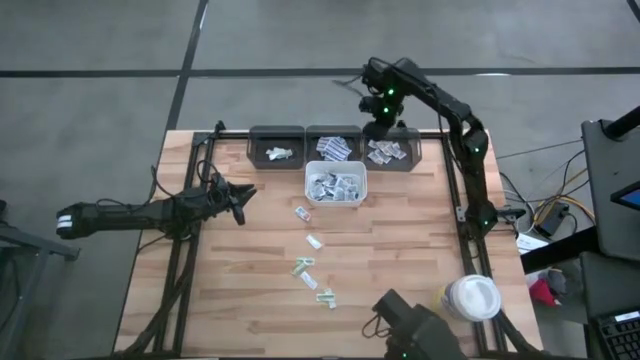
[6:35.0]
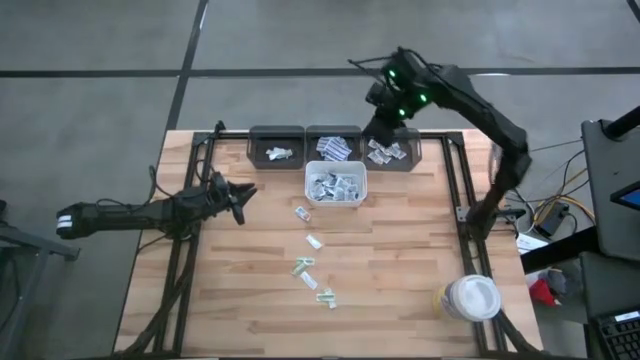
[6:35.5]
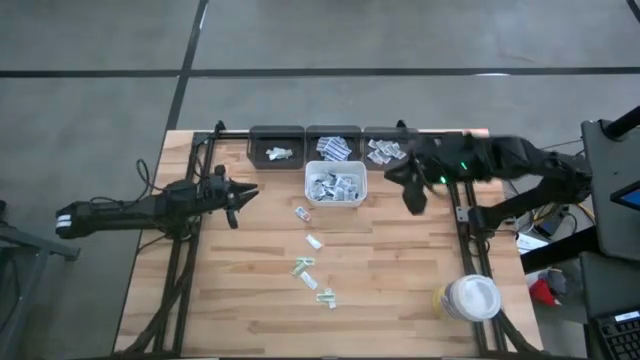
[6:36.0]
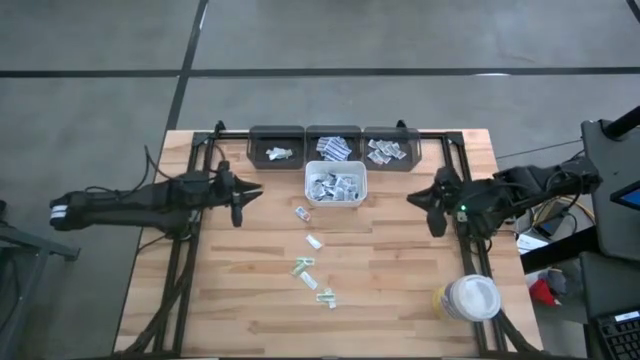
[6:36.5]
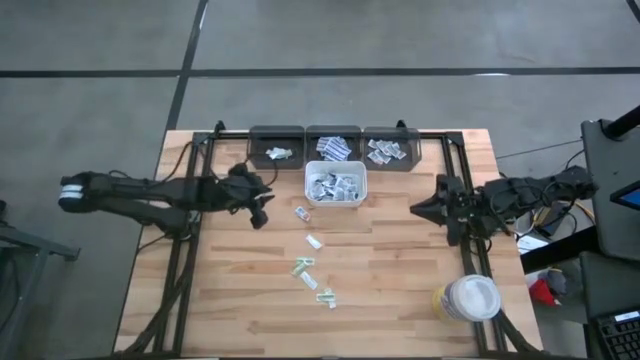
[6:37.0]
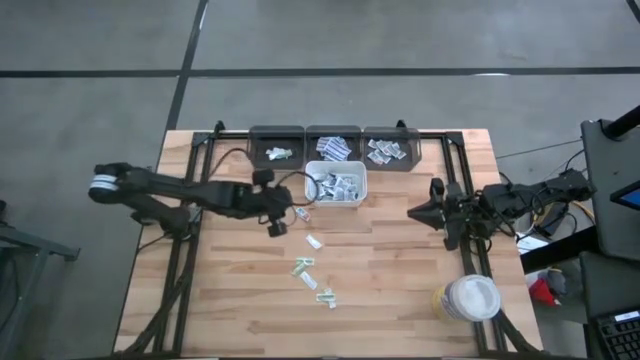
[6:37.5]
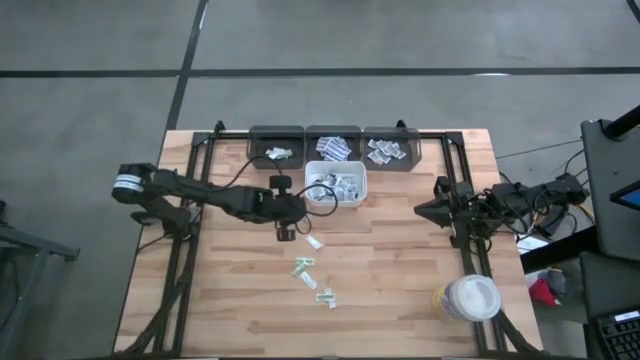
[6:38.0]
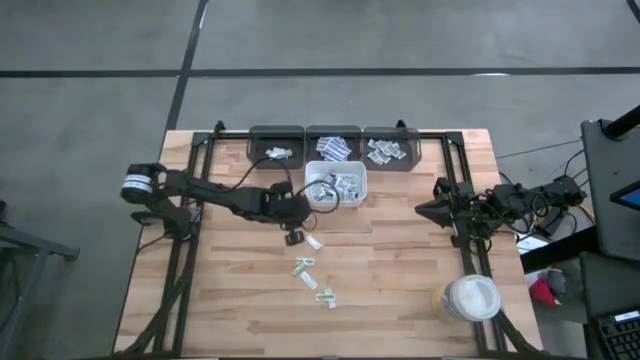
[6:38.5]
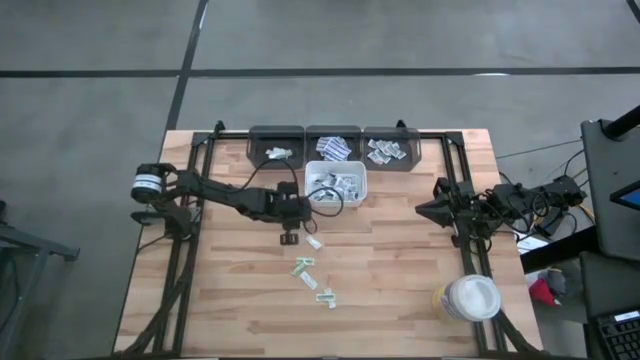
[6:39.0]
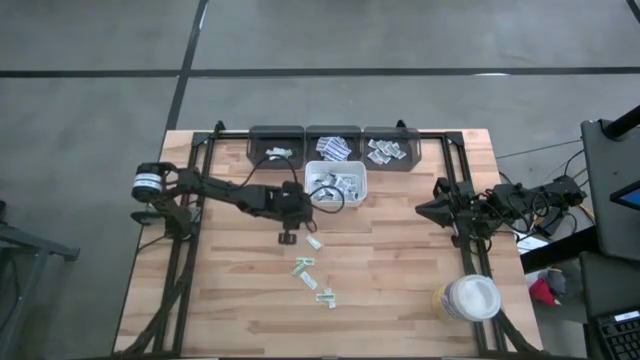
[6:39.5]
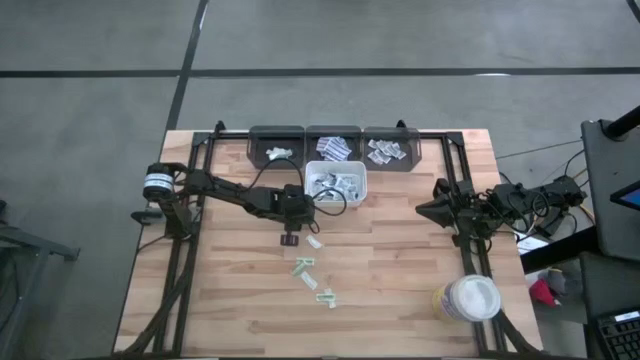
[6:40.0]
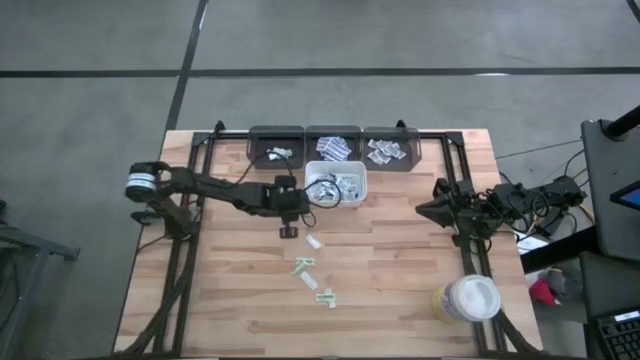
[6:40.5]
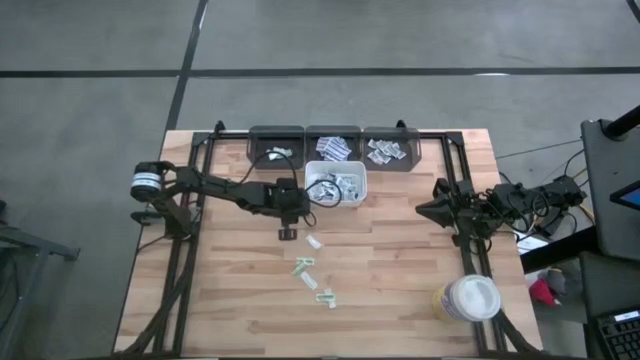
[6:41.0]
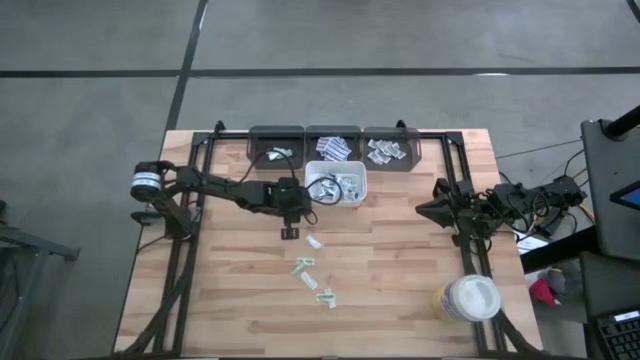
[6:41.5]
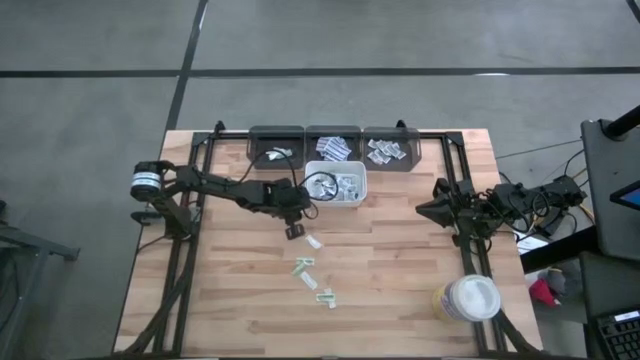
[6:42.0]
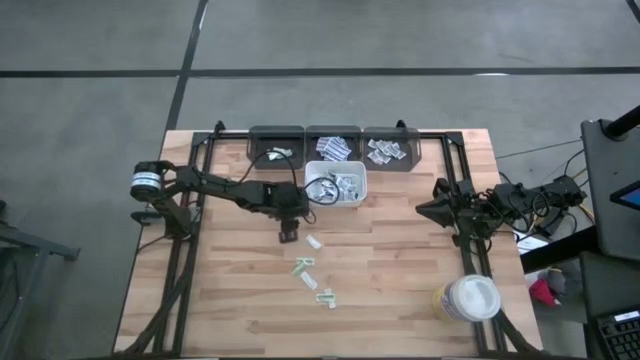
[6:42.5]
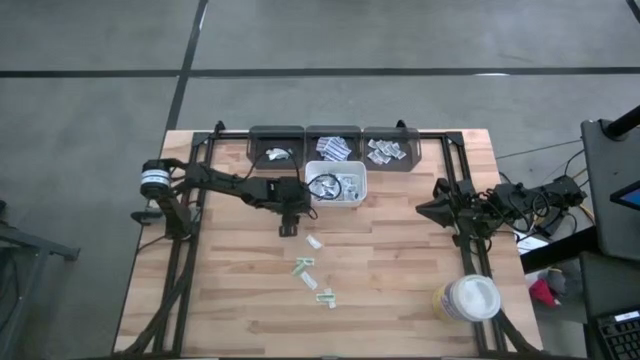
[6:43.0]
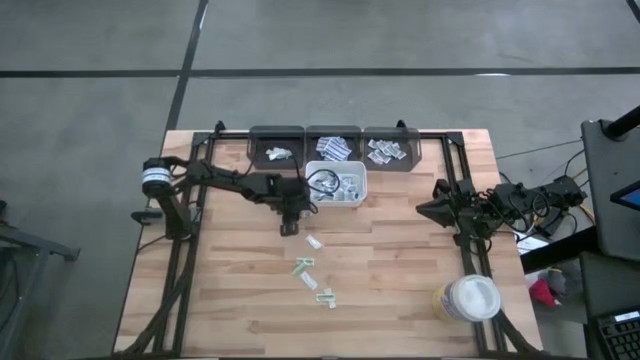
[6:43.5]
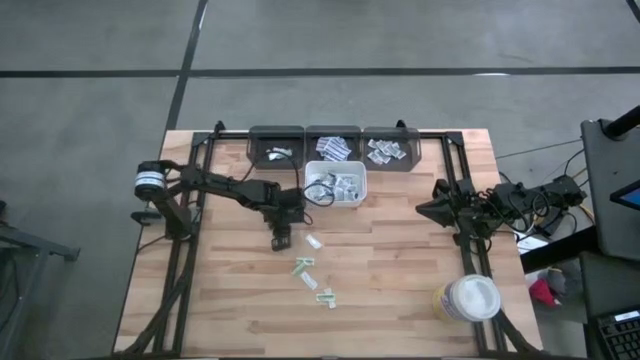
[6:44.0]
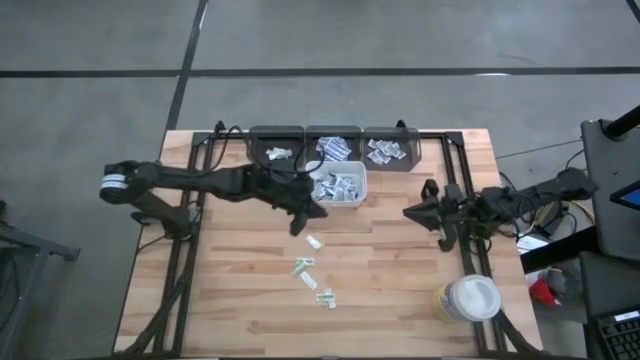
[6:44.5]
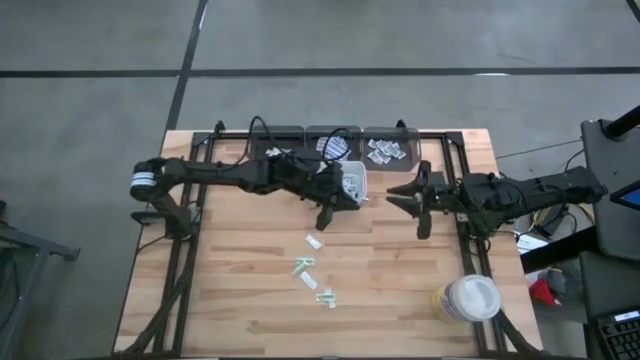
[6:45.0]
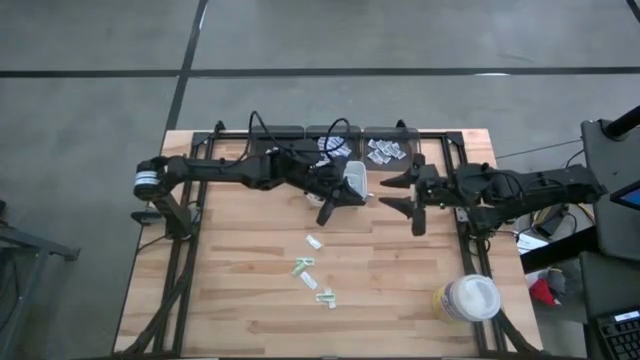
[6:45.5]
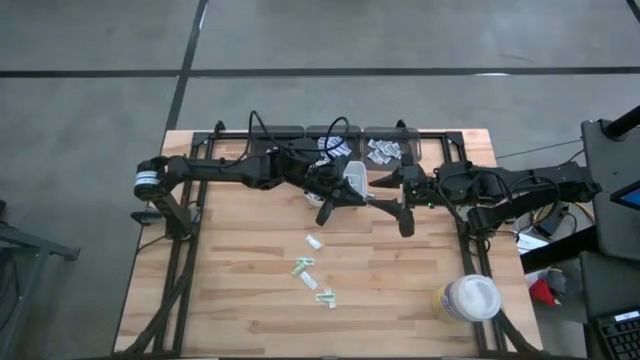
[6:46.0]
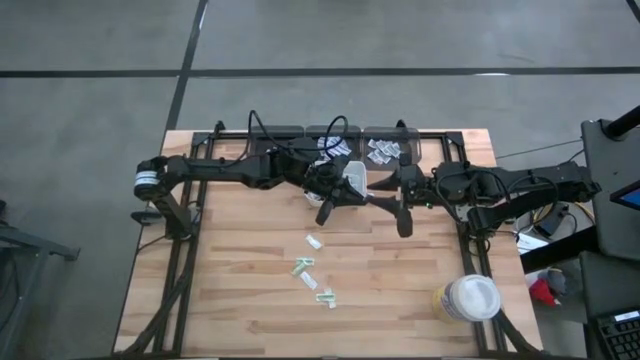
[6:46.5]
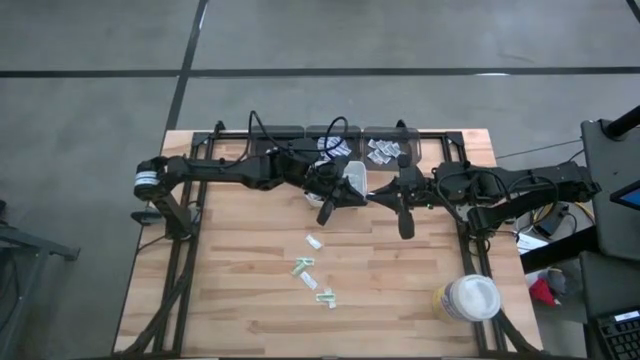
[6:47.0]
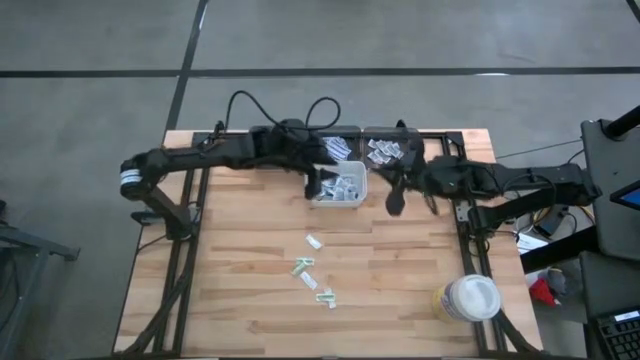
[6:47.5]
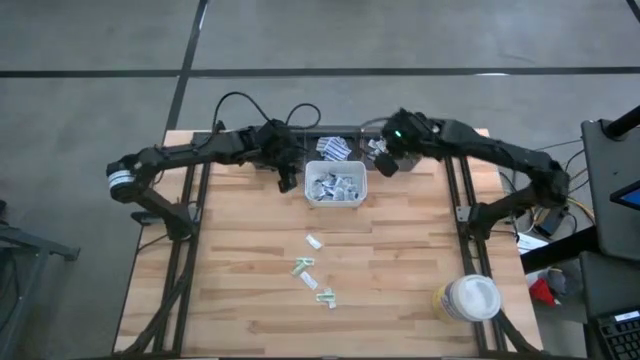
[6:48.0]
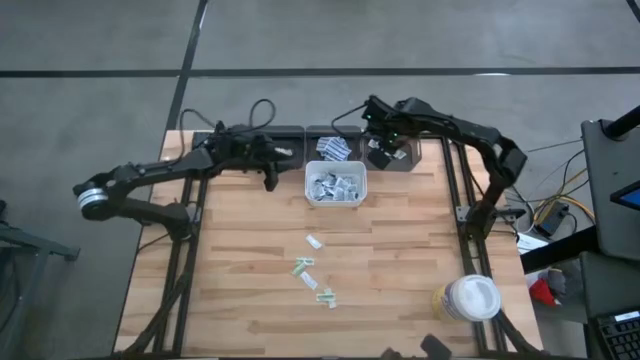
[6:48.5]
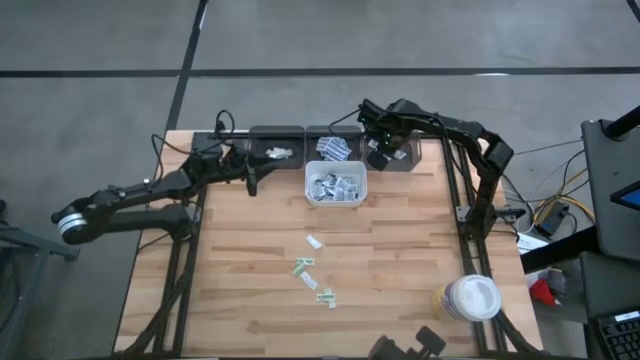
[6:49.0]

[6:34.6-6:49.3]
Task: Pick & Place First Aid Supplies
Put the orange ointment pack into the right black bin

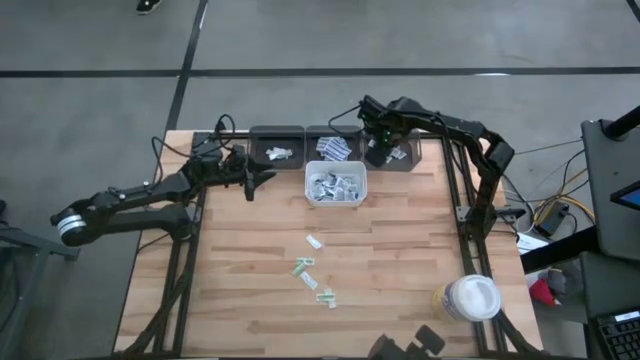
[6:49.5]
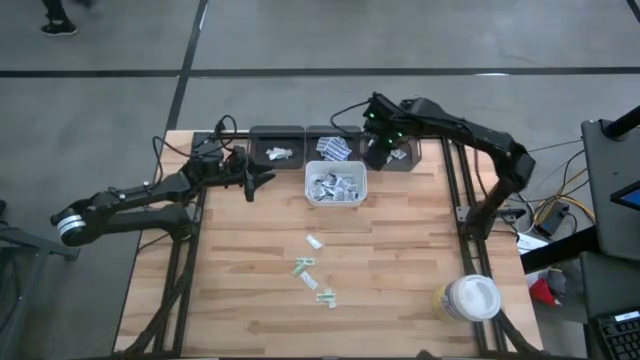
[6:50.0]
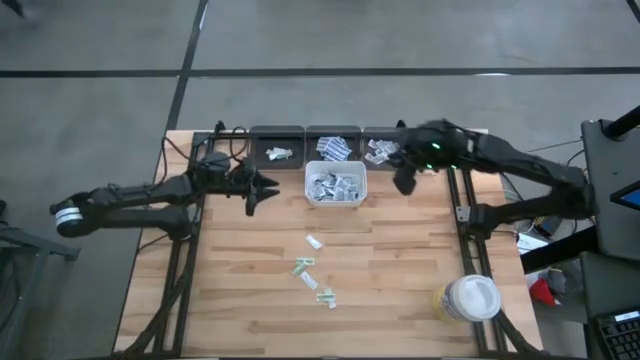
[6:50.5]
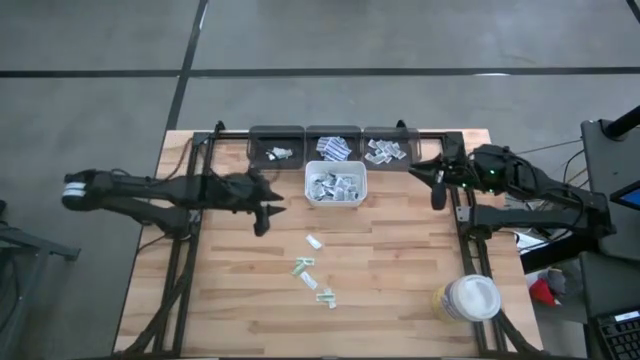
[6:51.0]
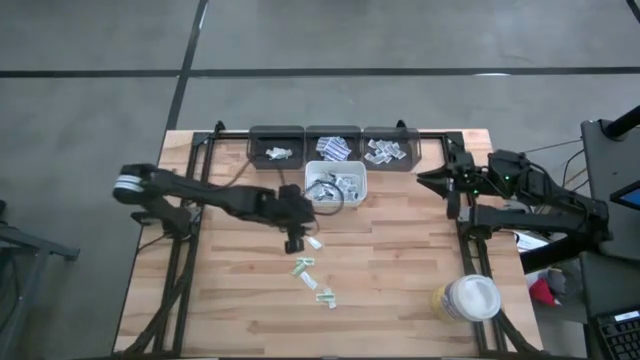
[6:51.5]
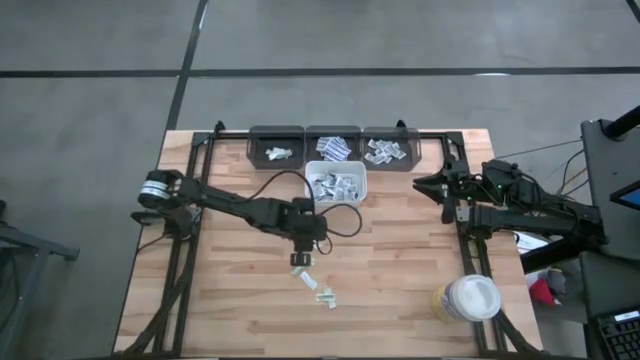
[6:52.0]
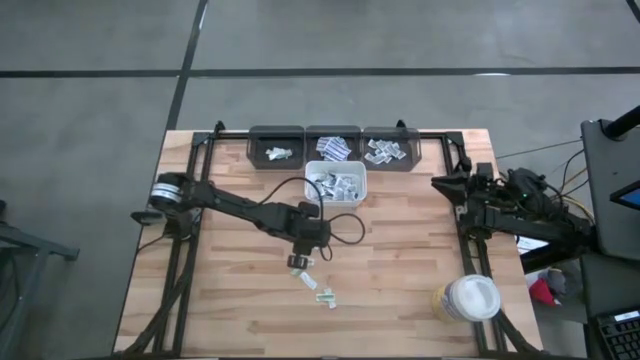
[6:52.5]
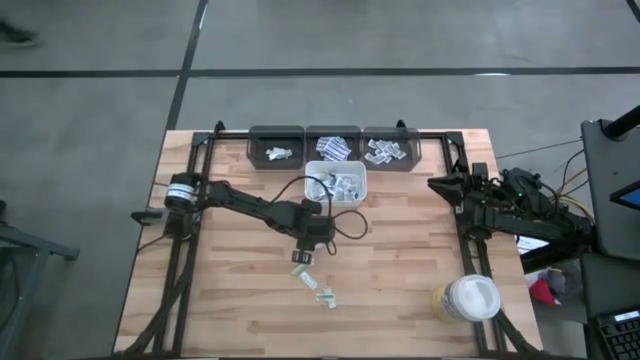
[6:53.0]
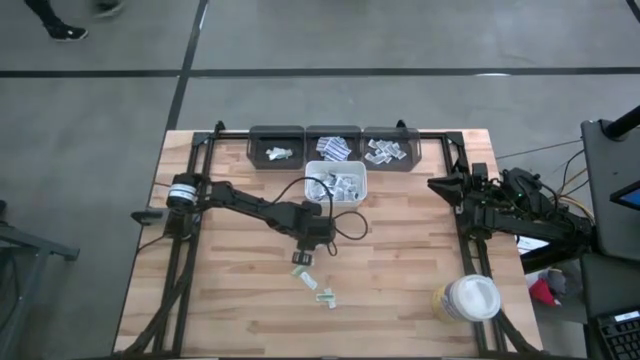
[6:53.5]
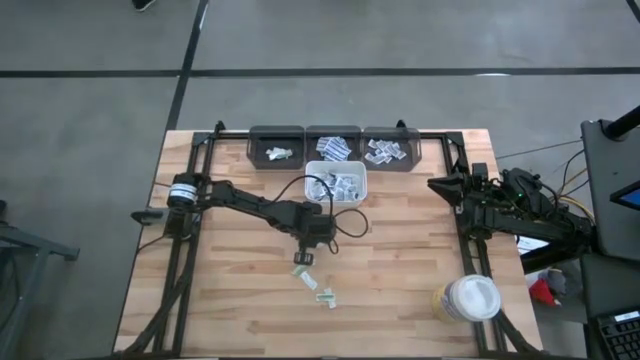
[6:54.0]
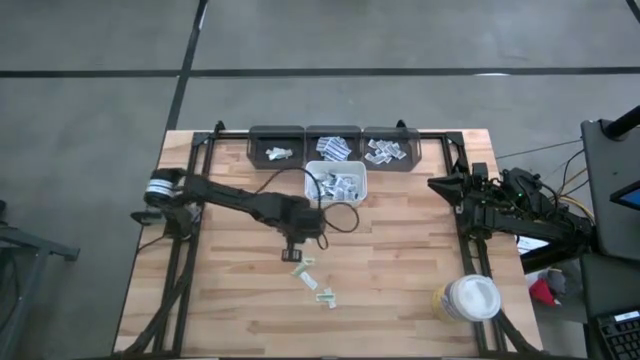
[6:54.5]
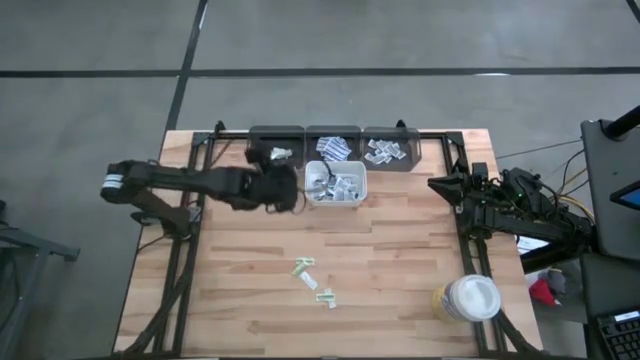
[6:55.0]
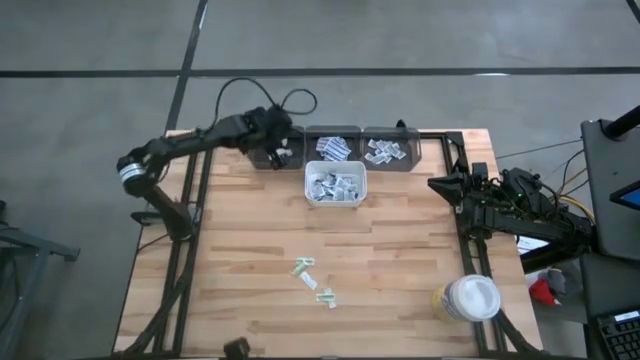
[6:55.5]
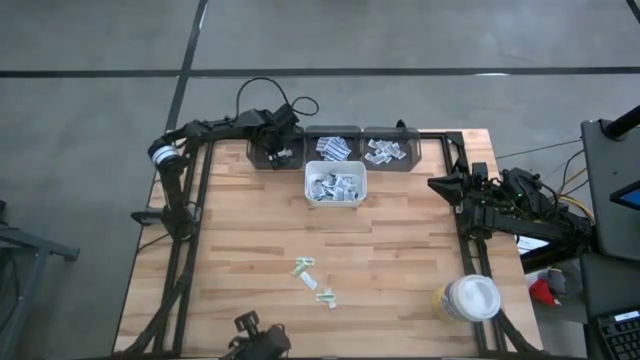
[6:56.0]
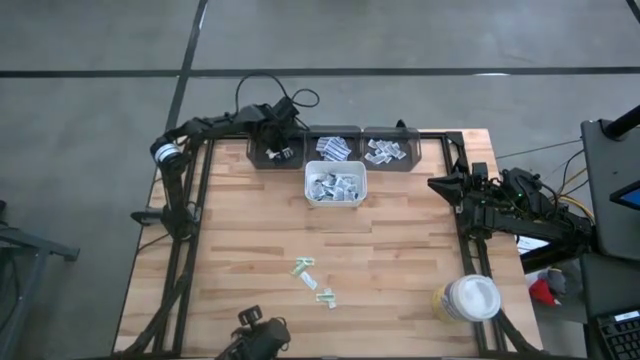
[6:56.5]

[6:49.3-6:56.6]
Put the green bandage into the left black bin
